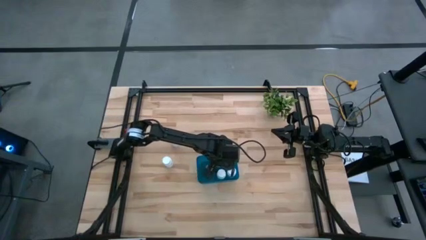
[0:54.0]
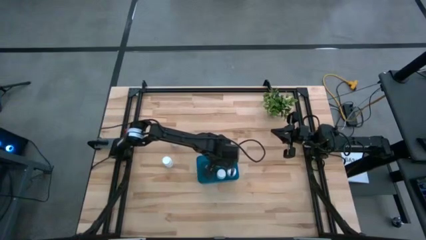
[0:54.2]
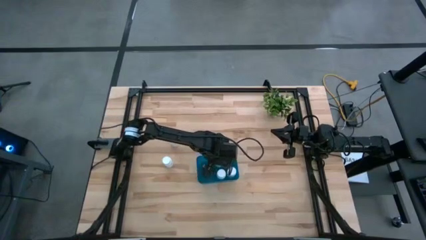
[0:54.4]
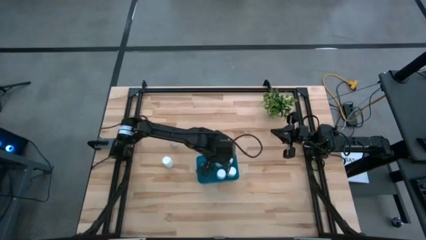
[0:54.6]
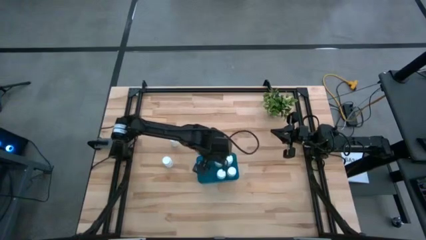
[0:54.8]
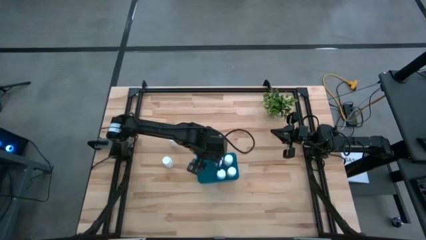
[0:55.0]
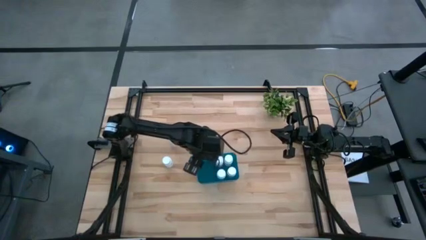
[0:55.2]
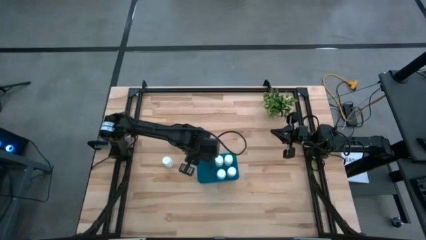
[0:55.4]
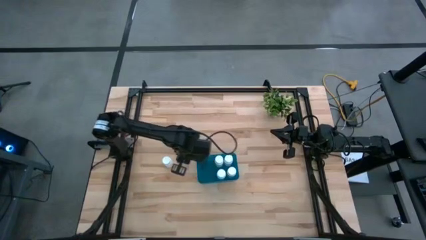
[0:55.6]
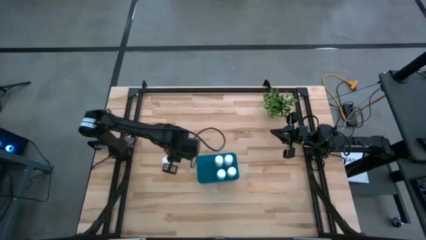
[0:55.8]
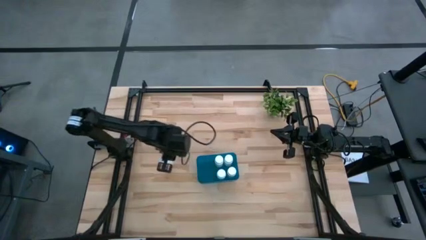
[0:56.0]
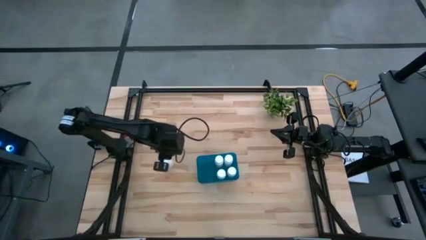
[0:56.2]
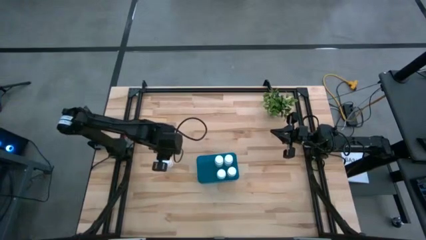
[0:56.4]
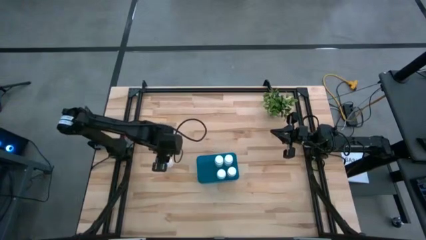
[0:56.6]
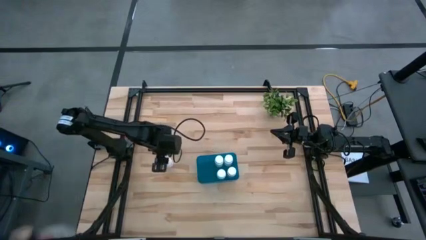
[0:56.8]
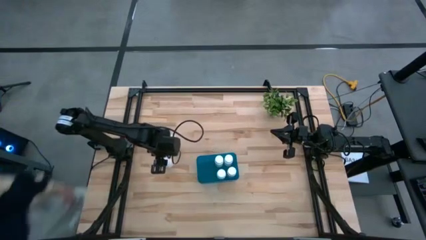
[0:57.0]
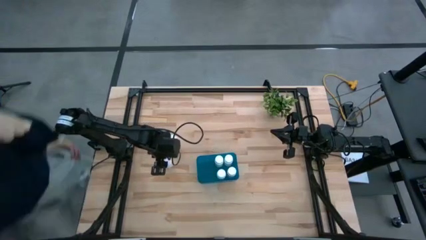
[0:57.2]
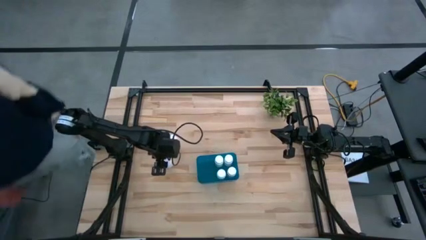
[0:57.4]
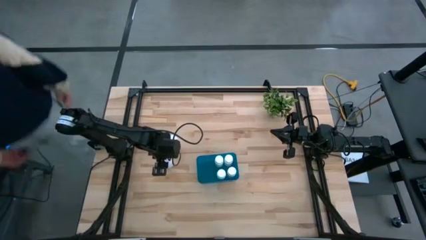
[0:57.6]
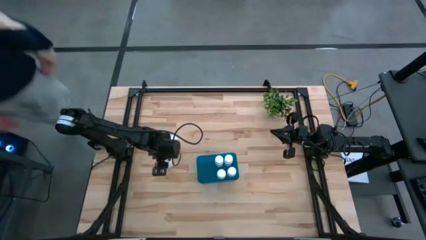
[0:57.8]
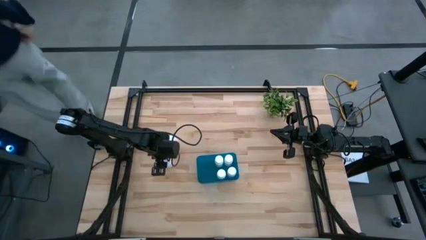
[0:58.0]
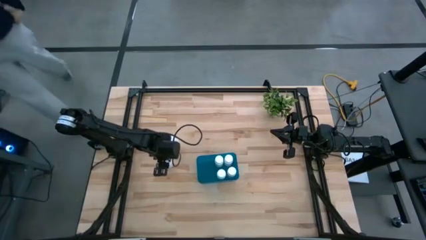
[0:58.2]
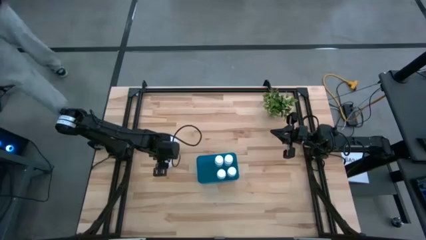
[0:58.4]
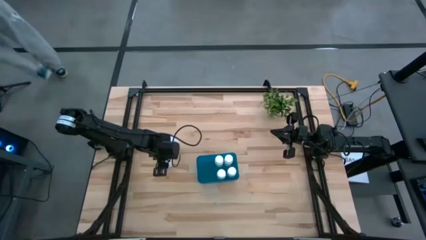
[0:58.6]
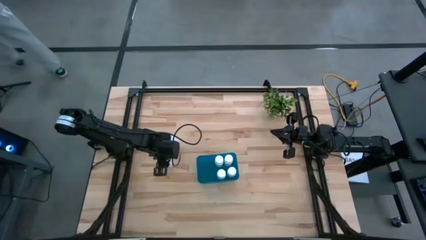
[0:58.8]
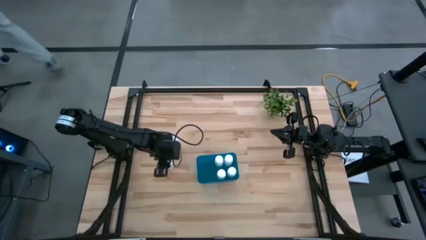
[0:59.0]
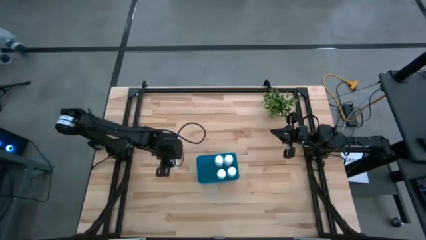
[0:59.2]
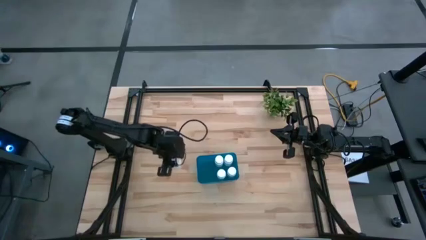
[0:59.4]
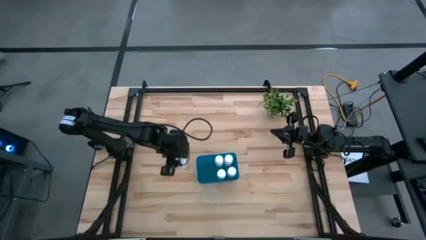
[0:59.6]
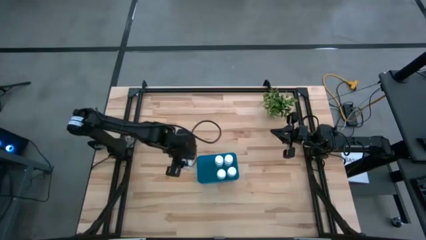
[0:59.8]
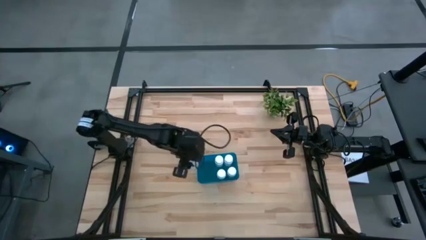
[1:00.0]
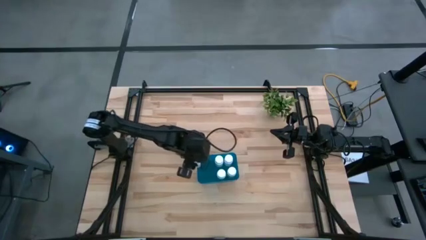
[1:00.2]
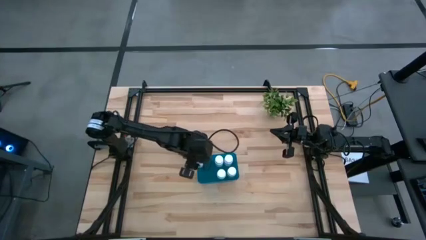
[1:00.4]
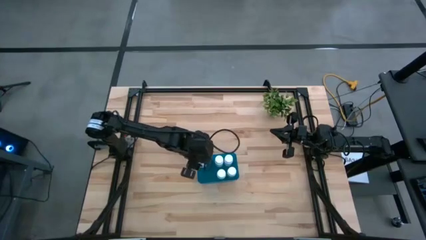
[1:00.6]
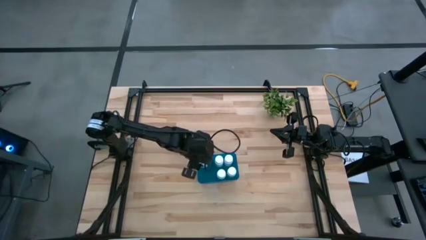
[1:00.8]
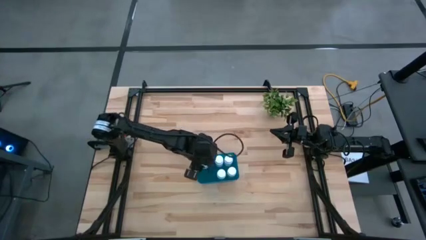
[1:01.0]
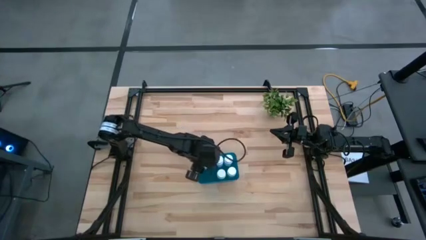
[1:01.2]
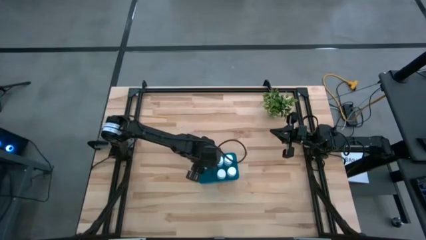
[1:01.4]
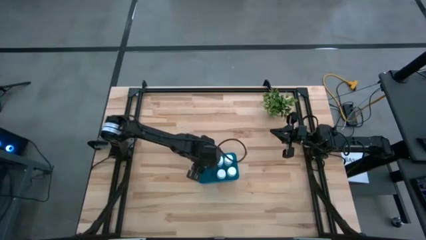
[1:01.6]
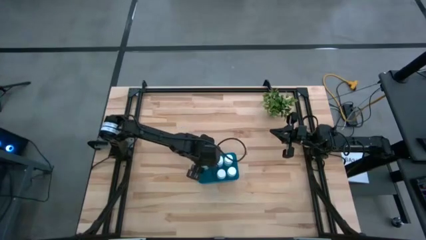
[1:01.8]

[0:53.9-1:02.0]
Task: Pick and place pill bottles into a basket
Put the medicine bottle into the blue bin

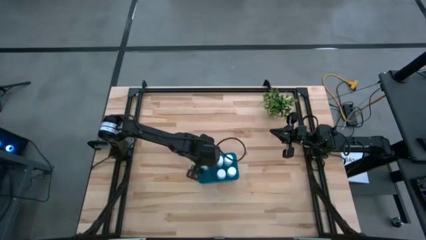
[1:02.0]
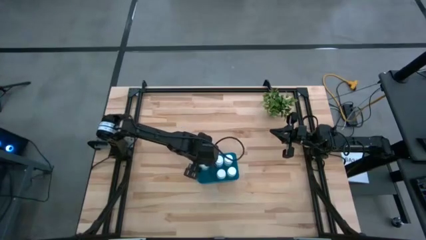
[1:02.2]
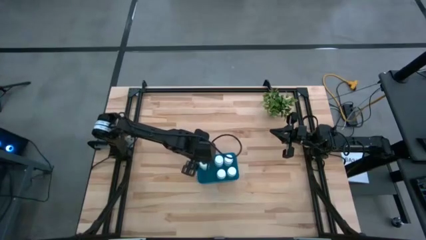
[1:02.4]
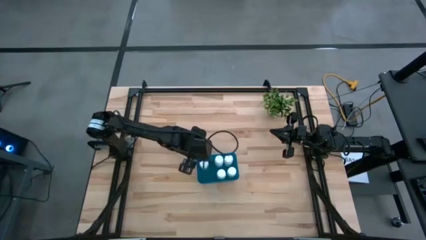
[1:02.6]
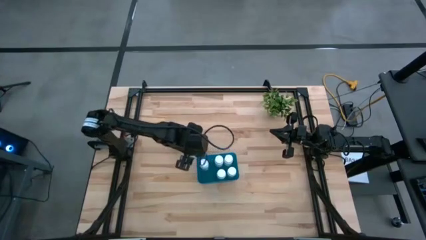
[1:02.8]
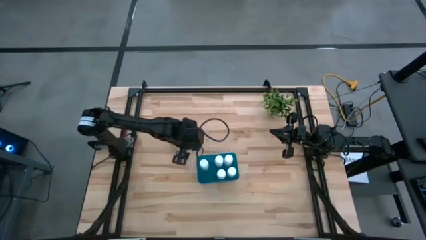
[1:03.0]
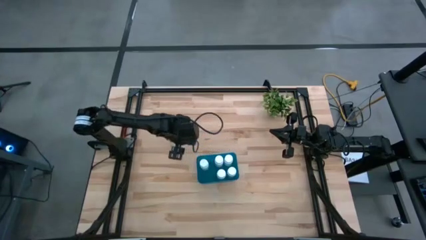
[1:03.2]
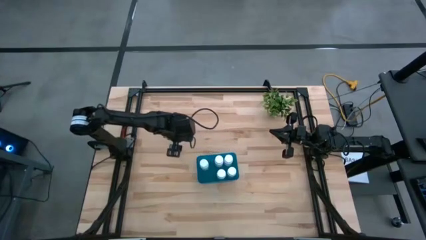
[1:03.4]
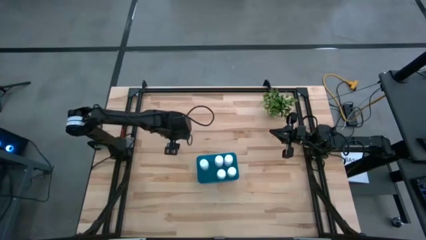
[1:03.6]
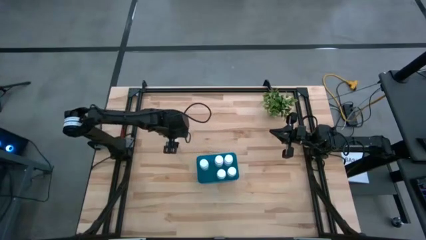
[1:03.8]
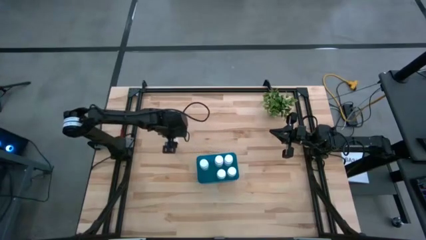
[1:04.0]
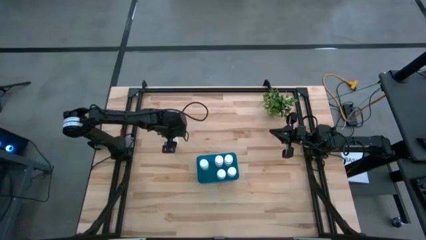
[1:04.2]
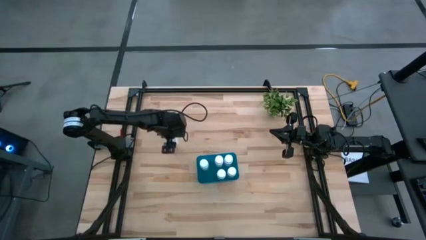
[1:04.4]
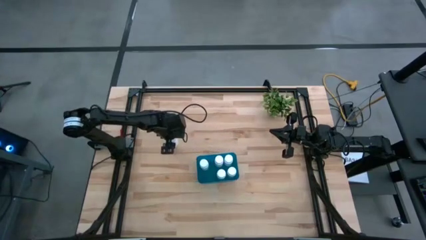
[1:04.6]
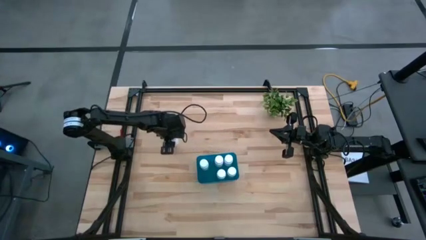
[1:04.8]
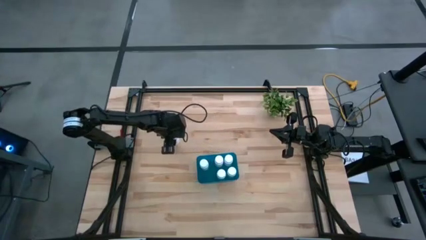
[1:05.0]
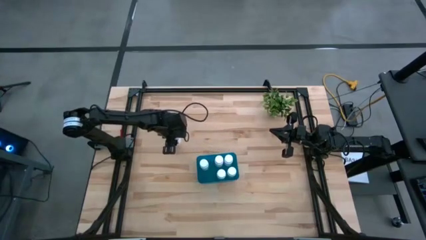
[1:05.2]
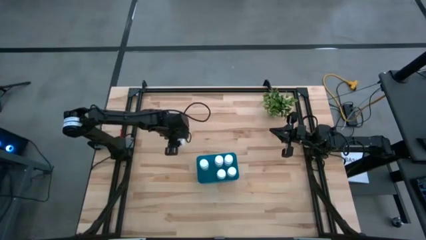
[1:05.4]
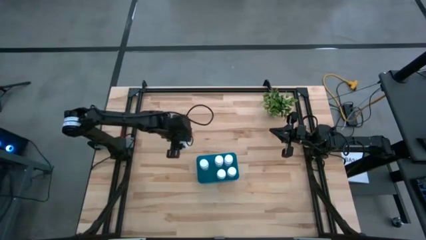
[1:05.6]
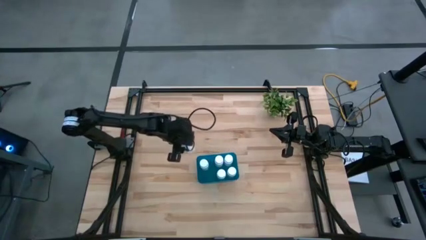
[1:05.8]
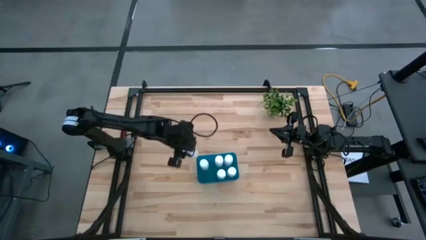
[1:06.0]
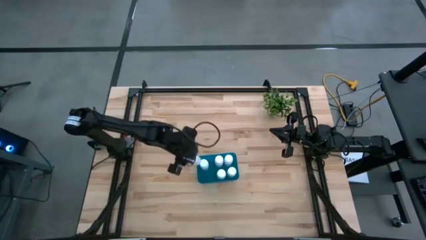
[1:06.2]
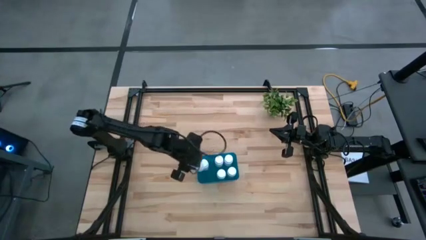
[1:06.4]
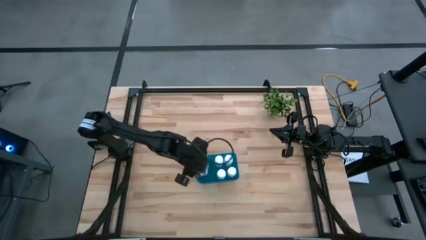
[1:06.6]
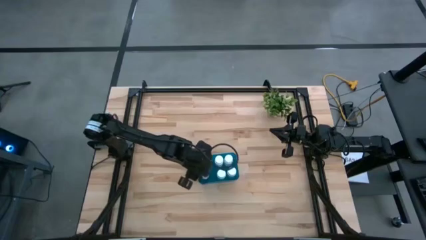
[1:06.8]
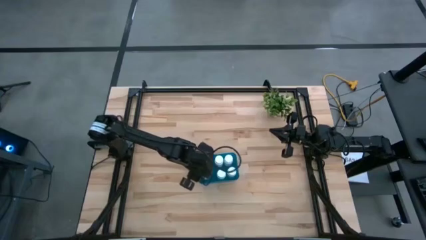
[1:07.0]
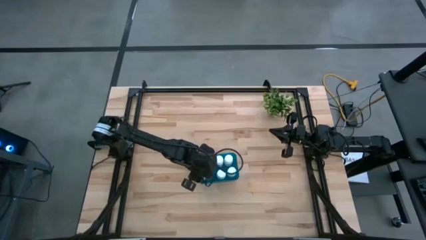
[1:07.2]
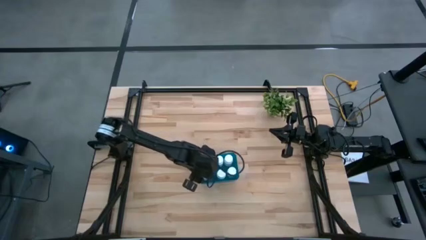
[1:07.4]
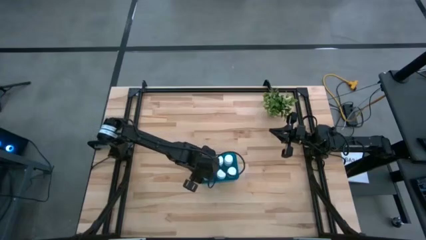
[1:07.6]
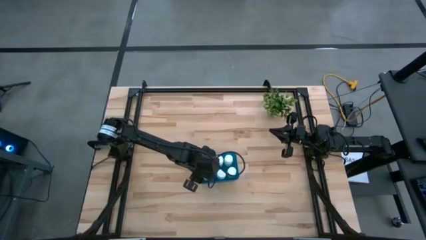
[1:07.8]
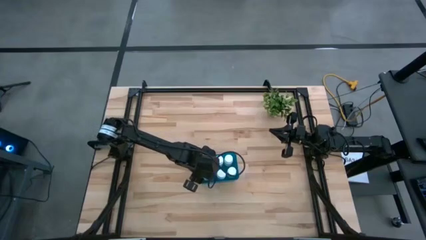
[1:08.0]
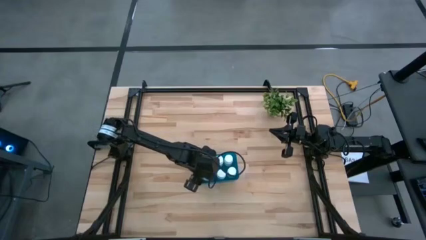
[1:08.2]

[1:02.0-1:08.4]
Put the medicine bottle into the blue bin

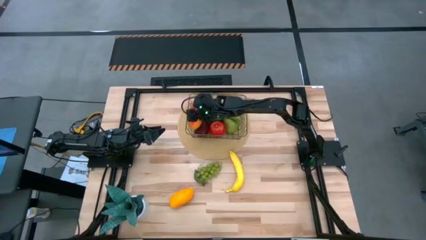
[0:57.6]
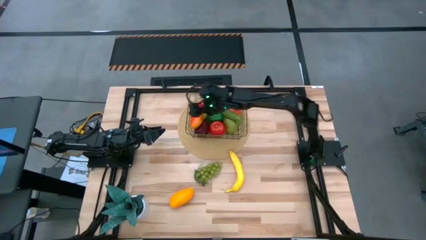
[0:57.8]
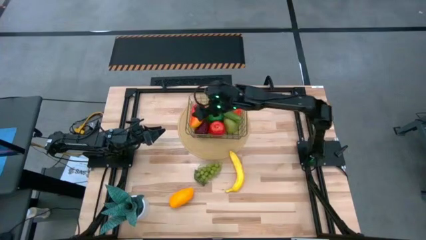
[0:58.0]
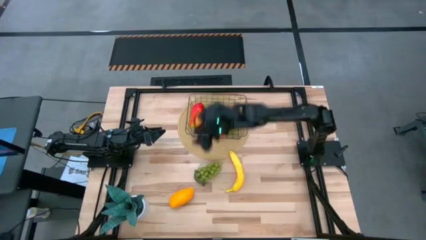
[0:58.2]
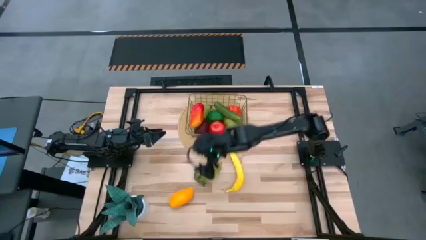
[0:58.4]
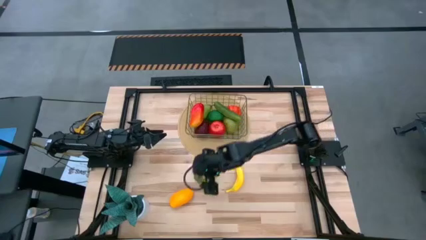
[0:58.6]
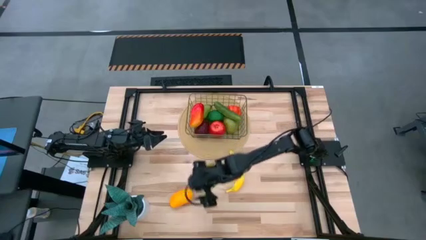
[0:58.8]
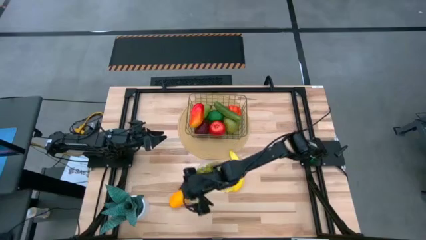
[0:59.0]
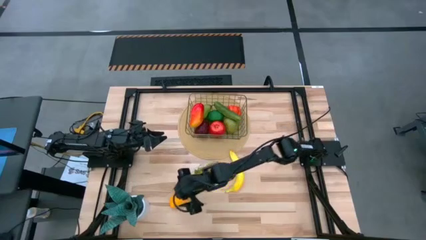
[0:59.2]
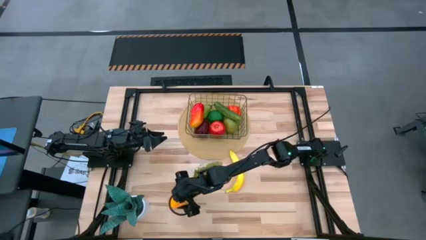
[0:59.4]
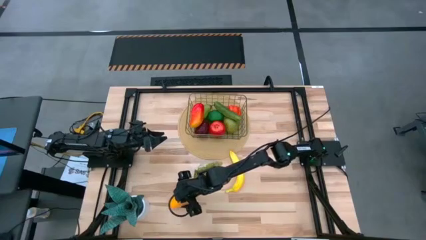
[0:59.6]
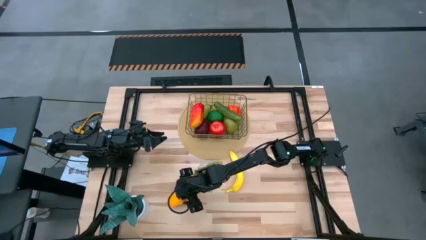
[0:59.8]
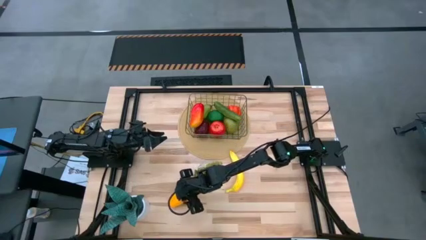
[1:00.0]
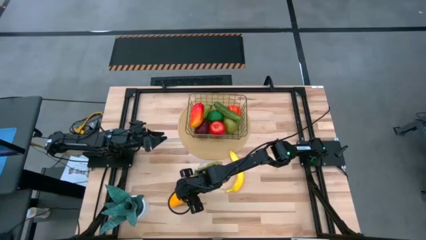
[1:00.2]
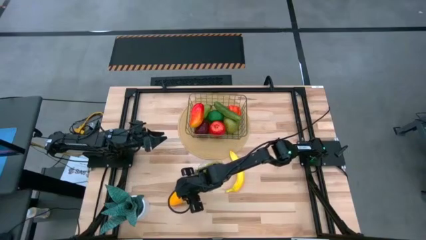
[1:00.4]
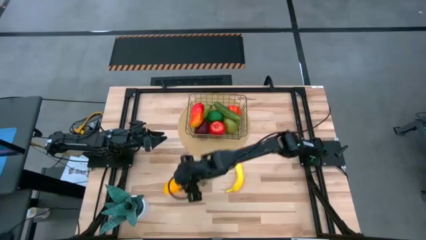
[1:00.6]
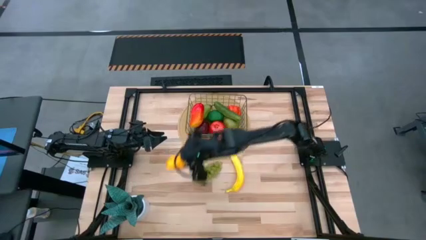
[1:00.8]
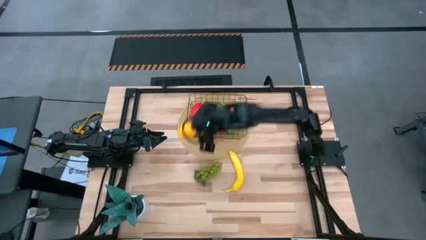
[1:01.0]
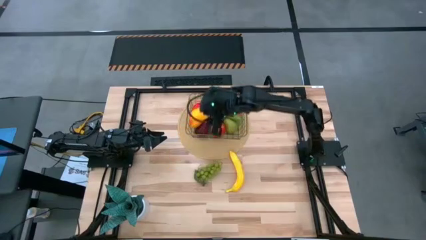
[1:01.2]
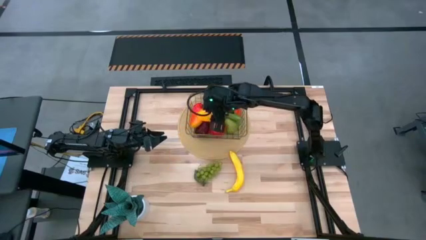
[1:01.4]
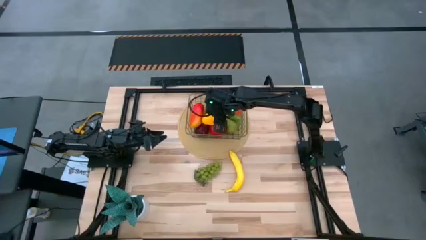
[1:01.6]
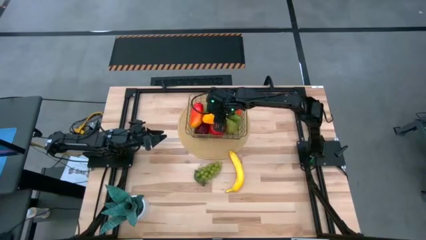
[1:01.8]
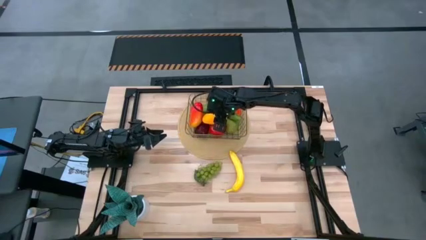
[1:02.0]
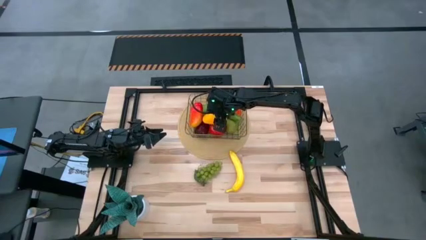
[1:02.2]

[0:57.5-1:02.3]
Task: Build produce basket
Put the yellow mango into the wire basket
